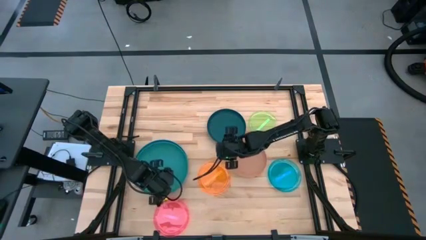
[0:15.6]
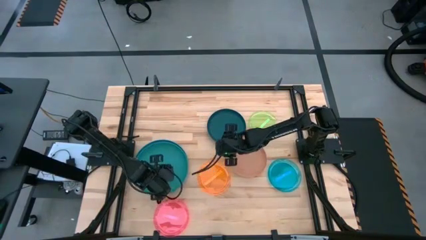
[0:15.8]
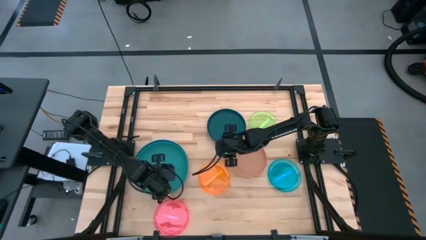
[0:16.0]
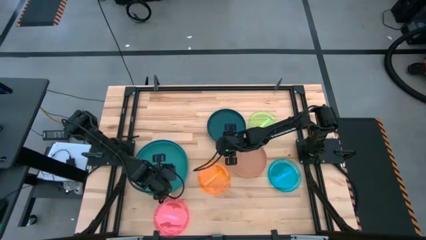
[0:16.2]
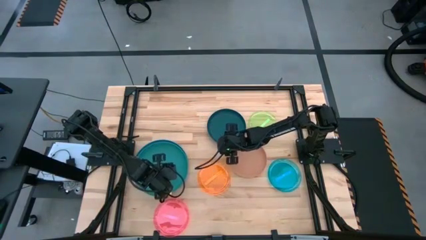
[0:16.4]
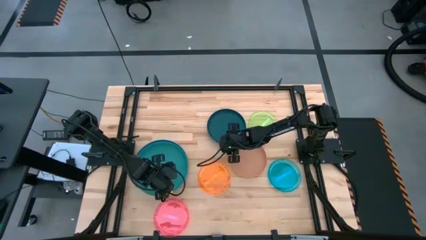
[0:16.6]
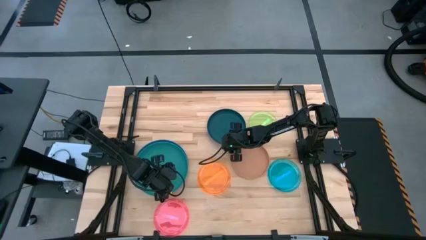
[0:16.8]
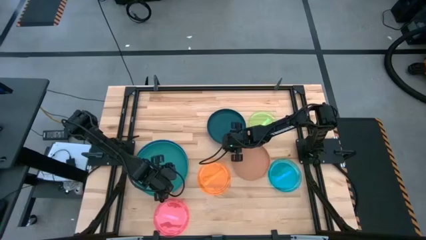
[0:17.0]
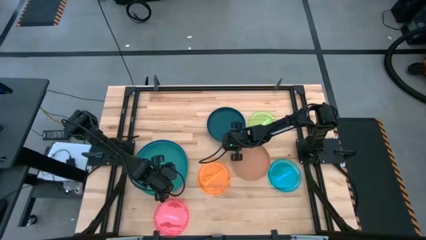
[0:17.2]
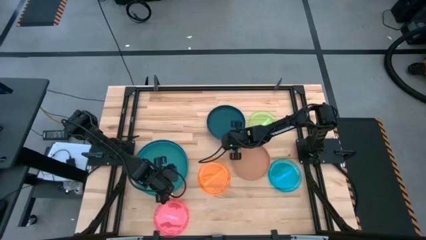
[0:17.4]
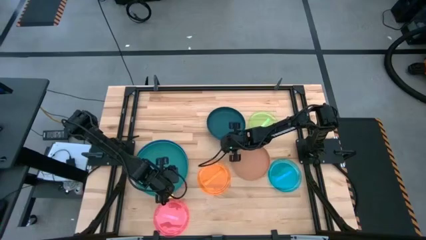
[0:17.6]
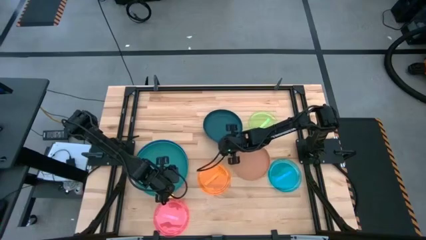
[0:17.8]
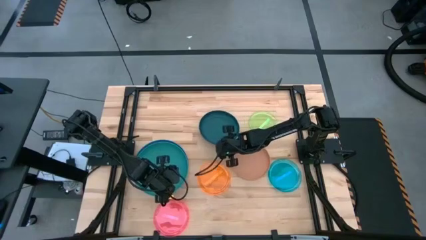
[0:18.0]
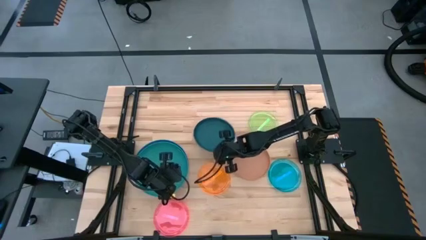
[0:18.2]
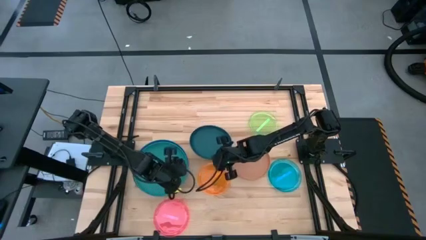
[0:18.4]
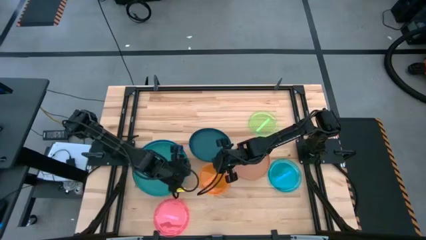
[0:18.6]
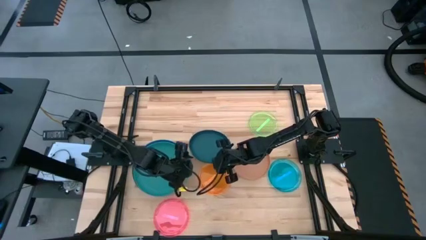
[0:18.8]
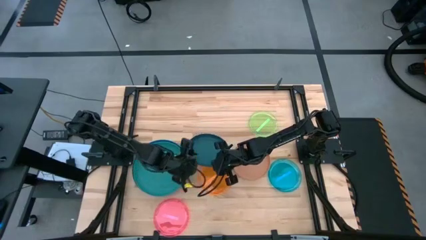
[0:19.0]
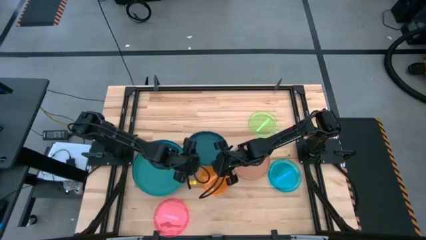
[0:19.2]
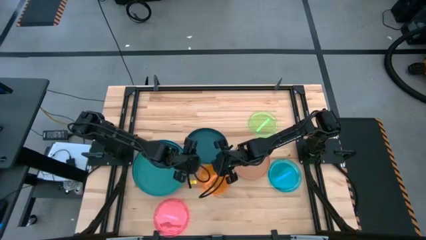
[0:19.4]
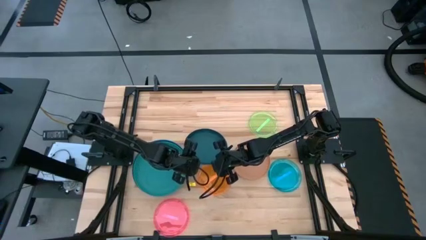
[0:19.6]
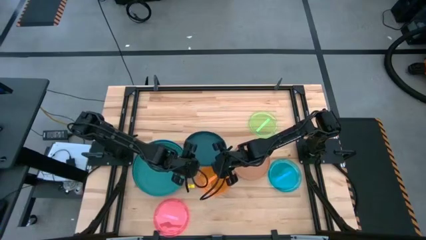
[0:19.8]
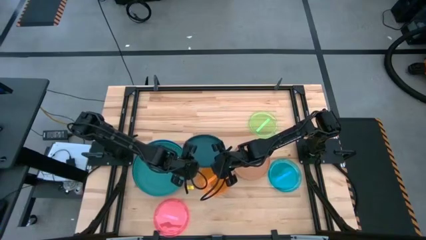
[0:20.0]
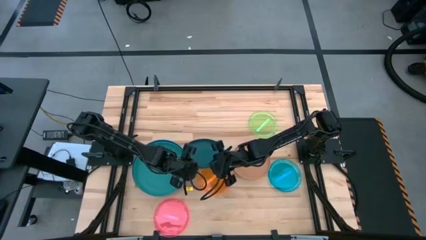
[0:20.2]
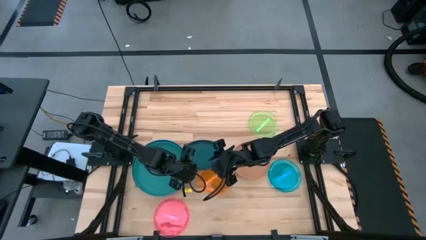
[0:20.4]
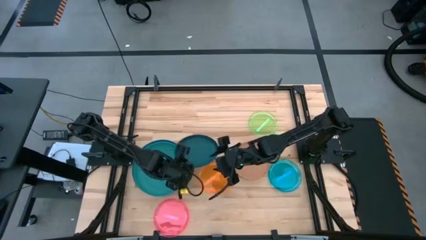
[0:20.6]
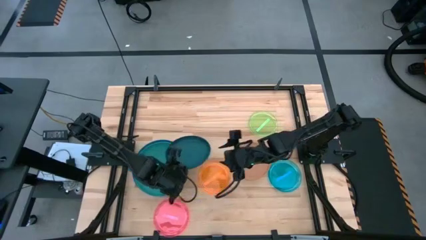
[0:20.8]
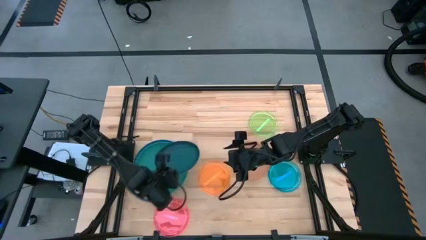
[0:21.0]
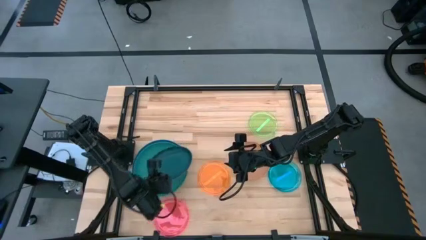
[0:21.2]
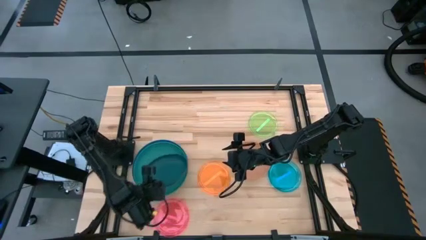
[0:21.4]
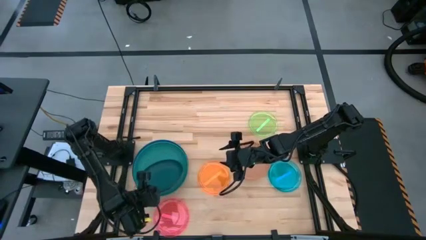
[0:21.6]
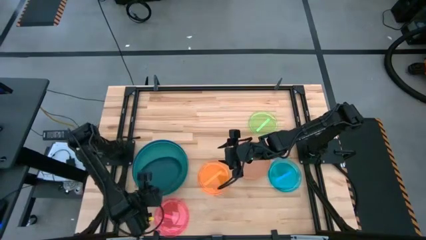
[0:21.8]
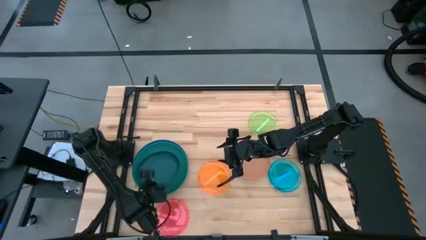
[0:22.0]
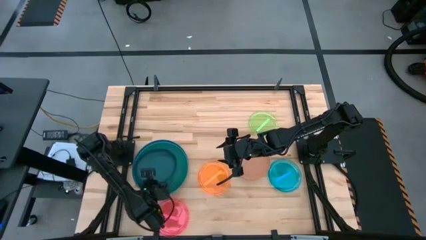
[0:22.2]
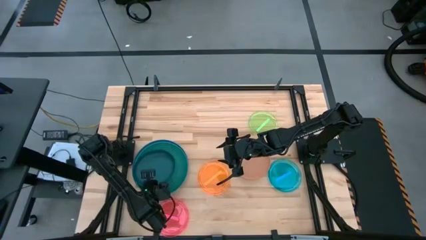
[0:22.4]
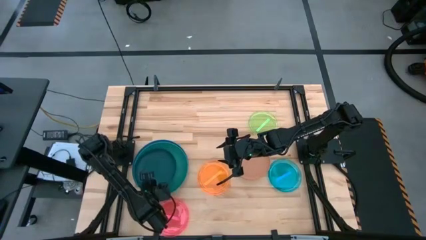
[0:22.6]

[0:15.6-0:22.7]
Task: Stack plastic plates
Stack the dark green plate on top of the green plate

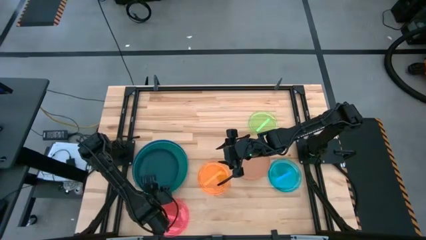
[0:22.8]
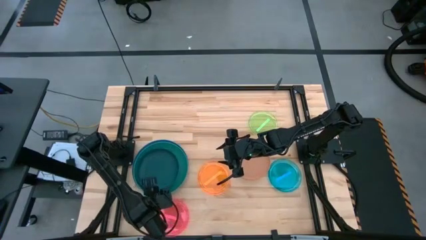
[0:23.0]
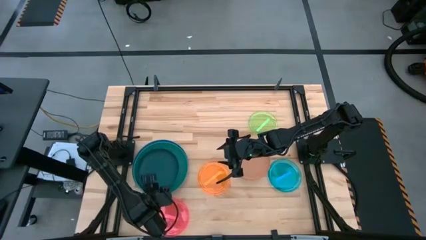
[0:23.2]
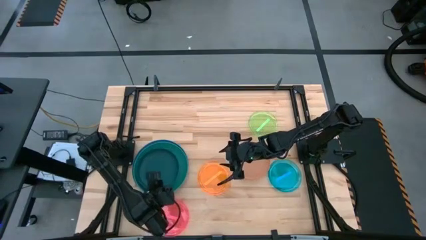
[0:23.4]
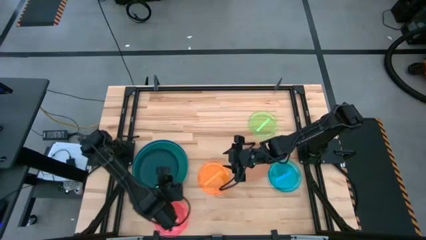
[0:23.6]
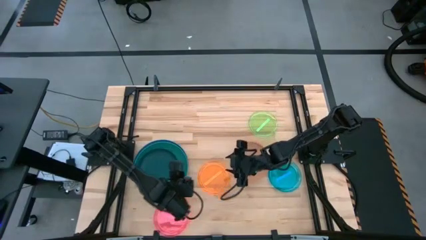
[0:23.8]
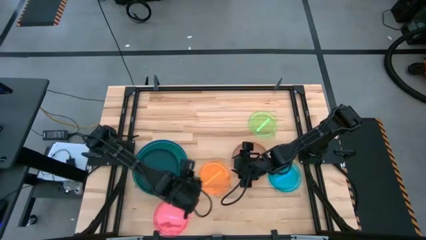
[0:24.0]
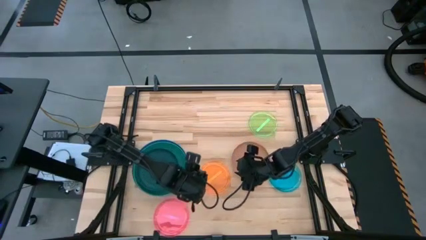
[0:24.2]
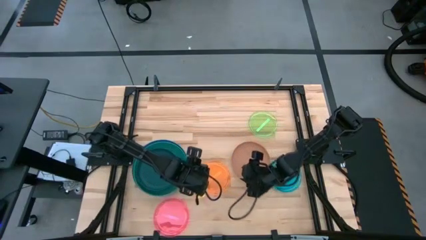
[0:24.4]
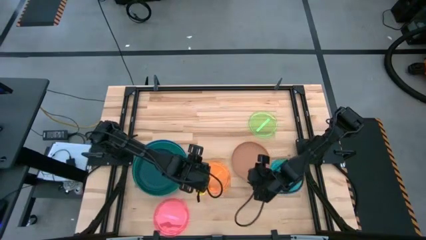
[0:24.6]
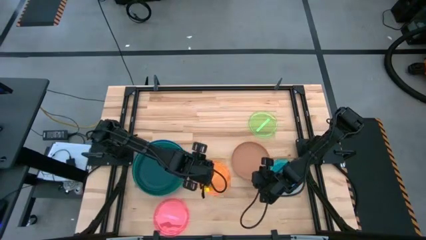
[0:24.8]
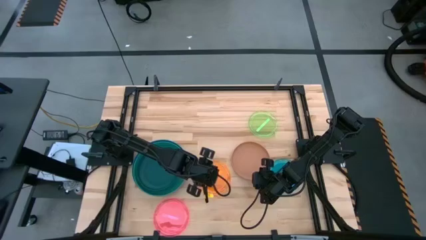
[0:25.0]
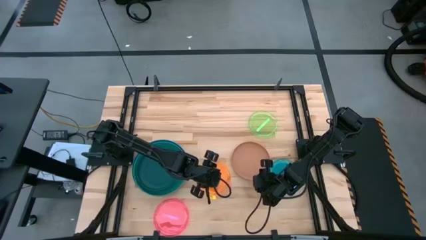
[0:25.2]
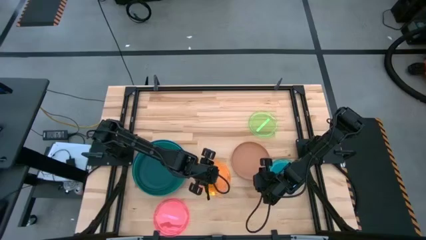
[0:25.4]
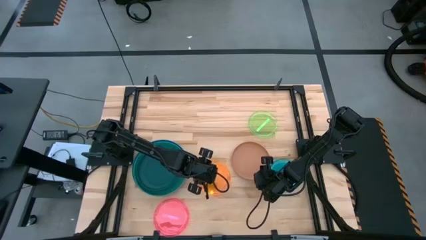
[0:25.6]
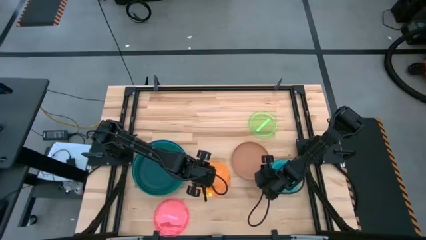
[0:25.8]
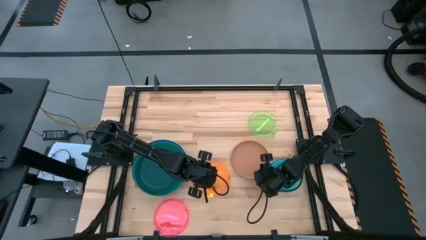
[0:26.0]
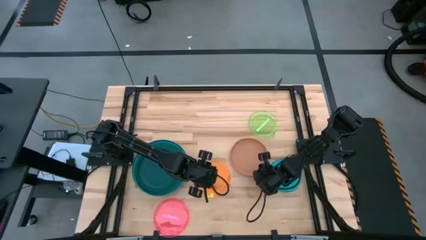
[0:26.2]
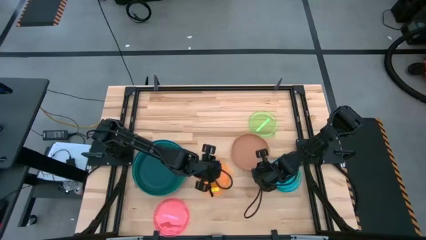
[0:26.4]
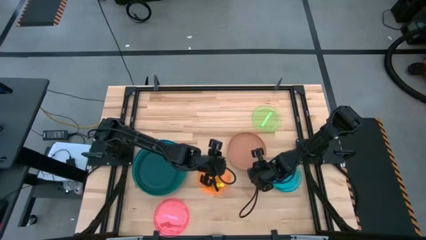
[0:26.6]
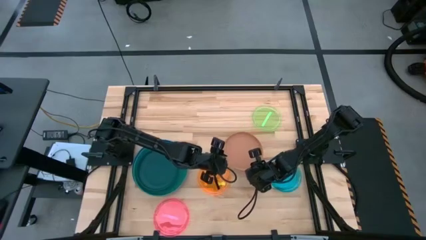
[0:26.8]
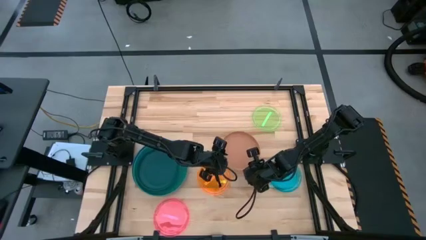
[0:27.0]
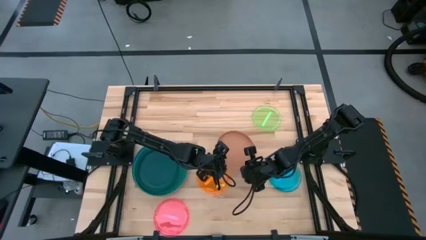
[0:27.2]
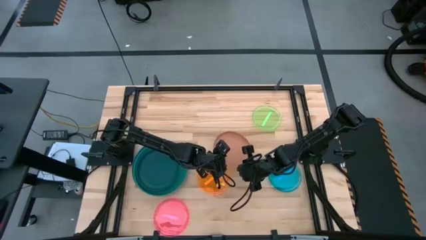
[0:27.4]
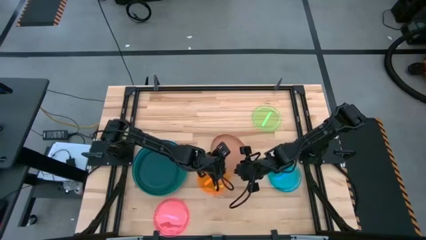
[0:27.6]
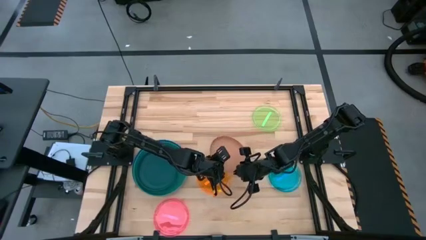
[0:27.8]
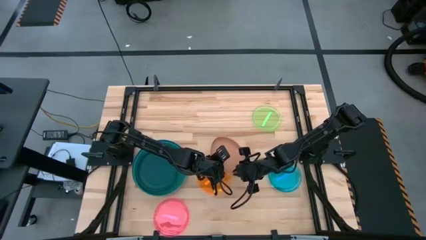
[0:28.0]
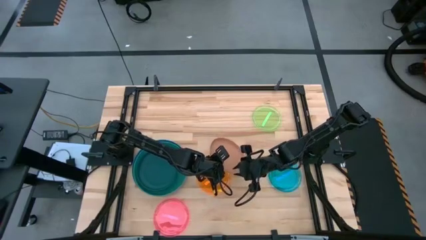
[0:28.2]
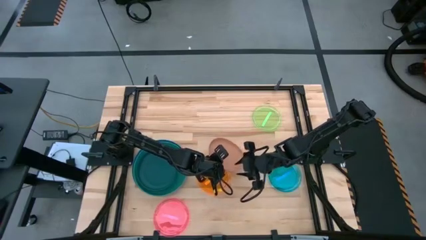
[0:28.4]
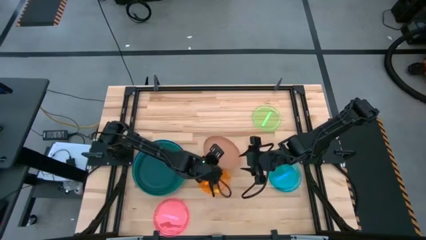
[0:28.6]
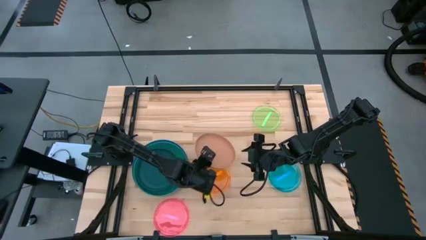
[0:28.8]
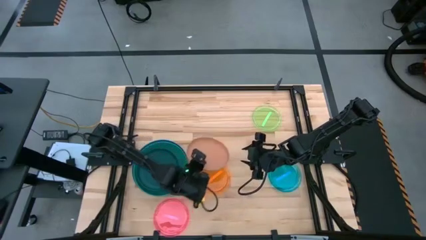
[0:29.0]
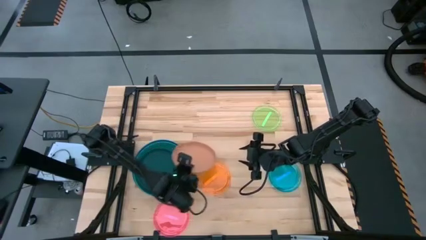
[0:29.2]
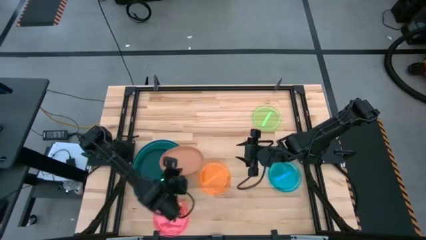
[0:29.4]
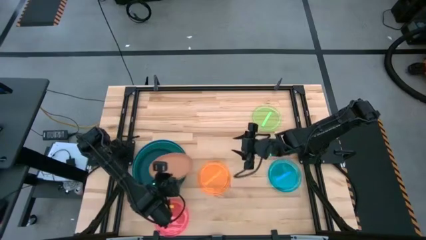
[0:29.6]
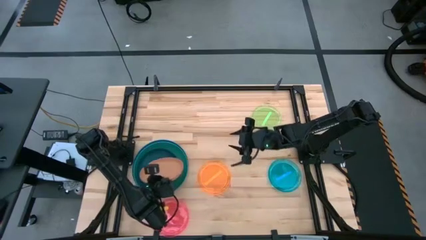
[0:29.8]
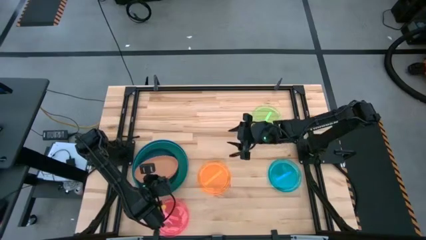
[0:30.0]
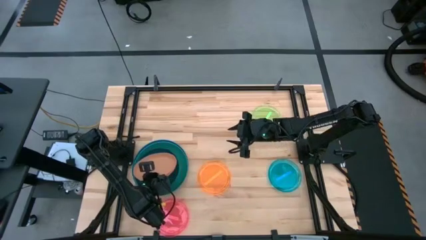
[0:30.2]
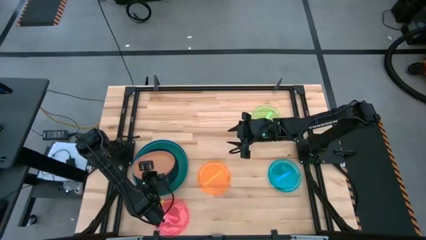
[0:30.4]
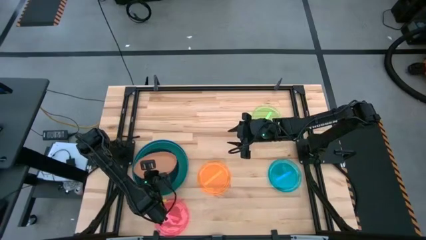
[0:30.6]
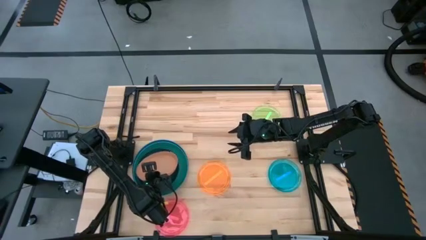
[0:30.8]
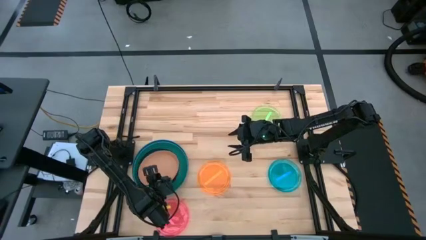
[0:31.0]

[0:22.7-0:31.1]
Stack the brown plate on top of the dark green plate
